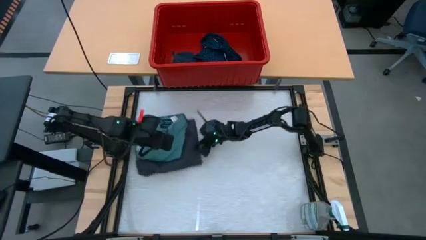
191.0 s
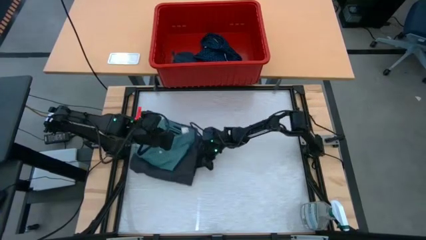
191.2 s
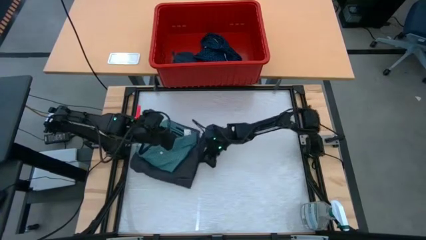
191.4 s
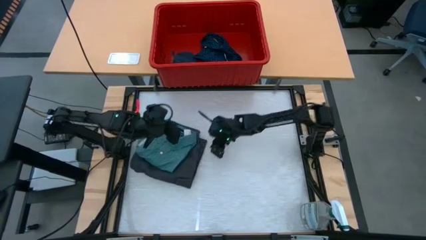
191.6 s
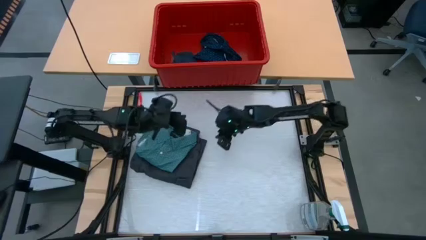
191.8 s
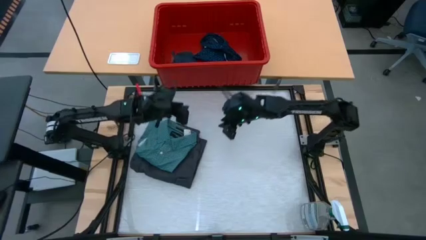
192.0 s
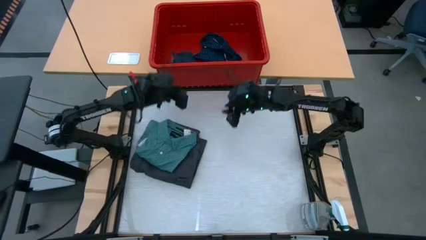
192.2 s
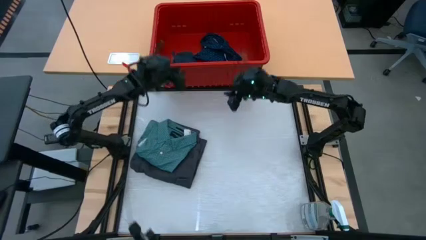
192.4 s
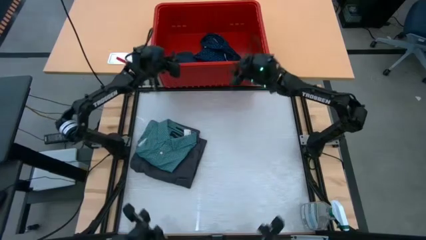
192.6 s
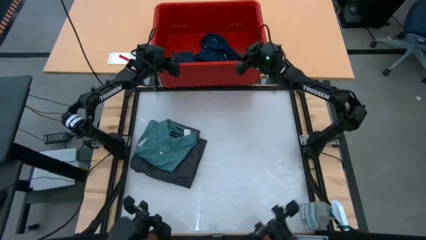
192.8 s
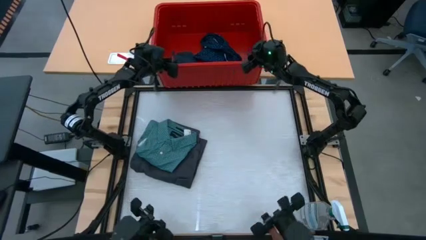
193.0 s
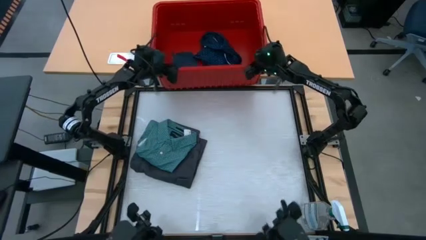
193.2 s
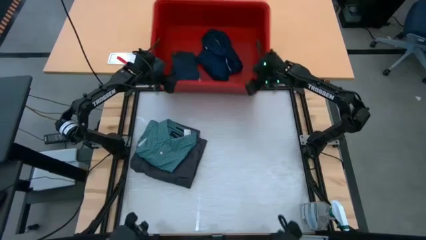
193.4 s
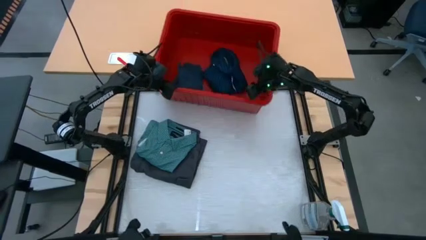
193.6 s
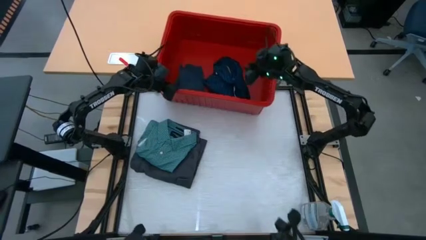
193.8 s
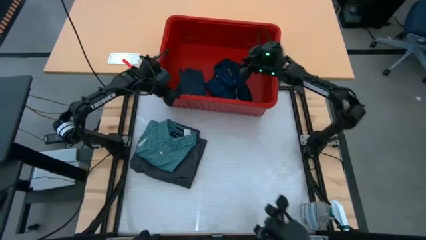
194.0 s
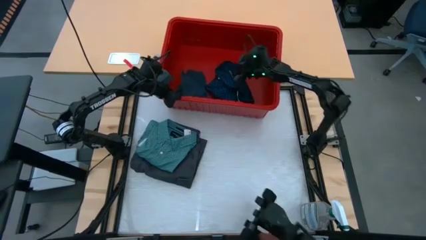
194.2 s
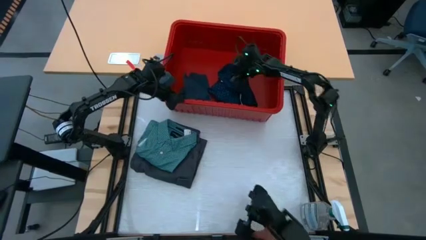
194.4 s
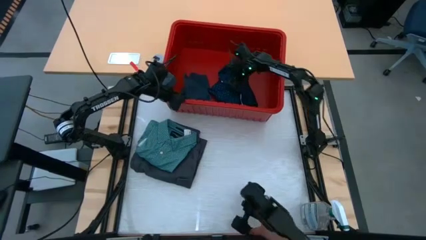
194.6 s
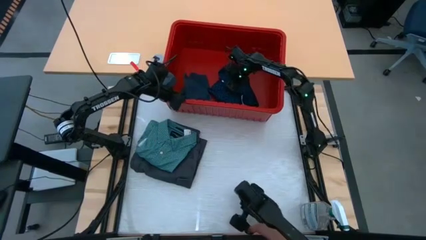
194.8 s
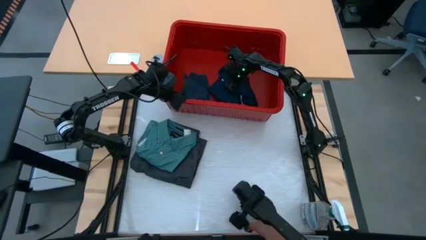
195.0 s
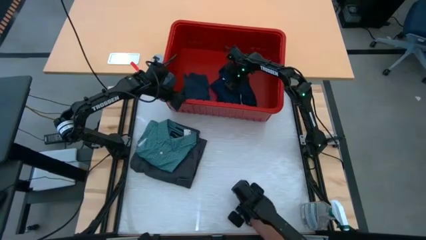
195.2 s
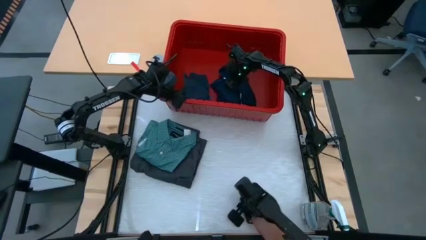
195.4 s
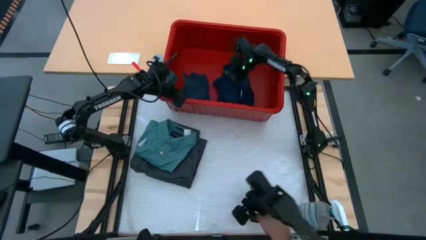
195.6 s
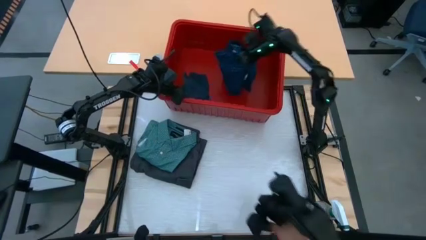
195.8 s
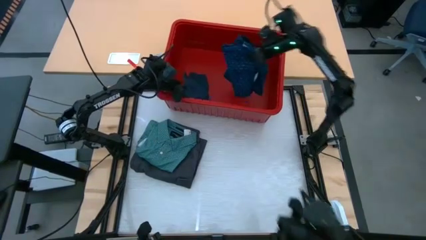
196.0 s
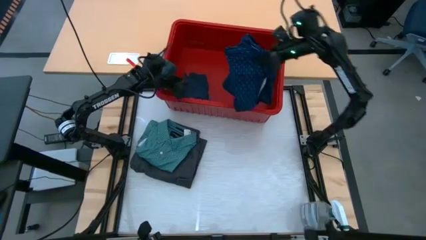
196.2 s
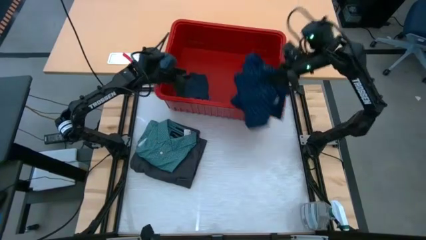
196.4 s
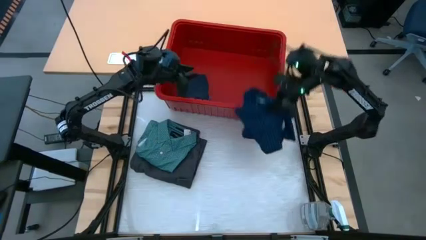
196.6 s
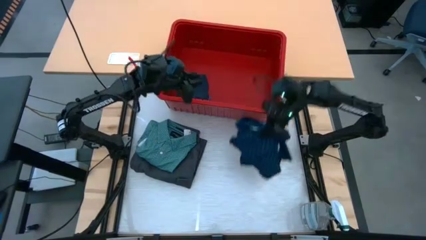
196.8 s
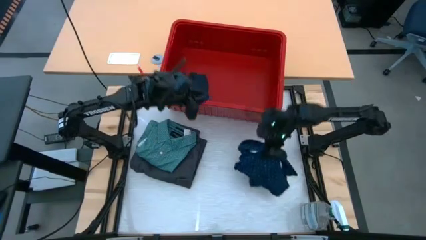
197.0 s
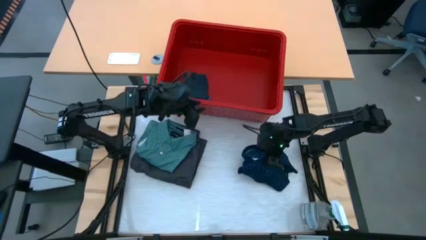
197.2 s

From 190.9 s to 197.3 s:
Task: Fold laundry
Remove the dark blue polo from the red bin

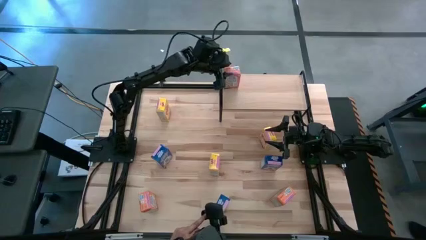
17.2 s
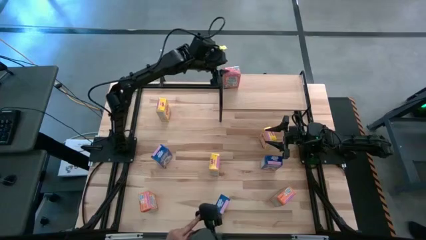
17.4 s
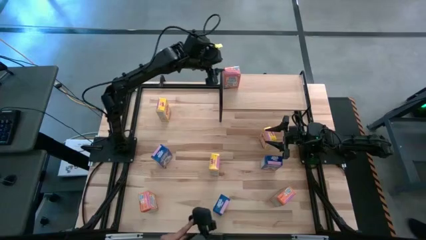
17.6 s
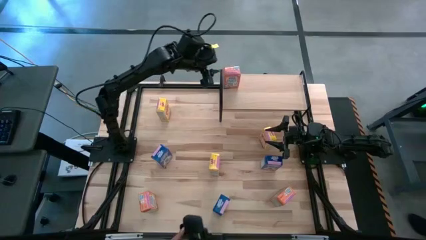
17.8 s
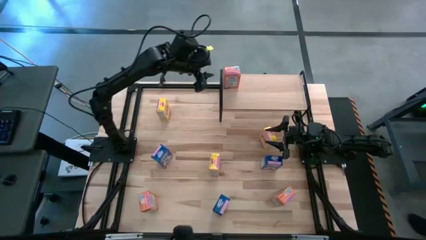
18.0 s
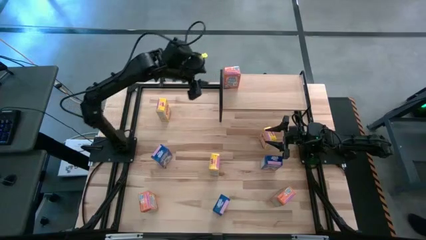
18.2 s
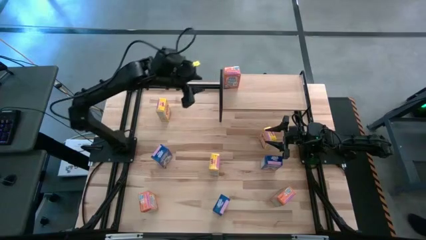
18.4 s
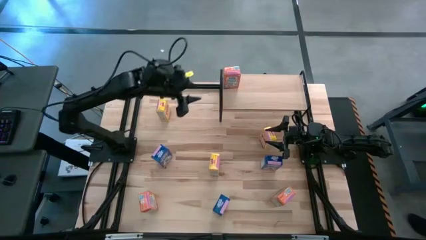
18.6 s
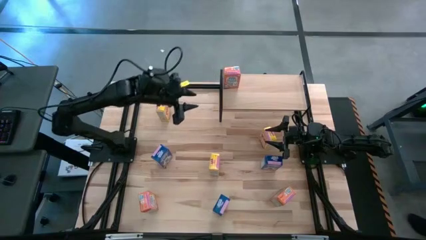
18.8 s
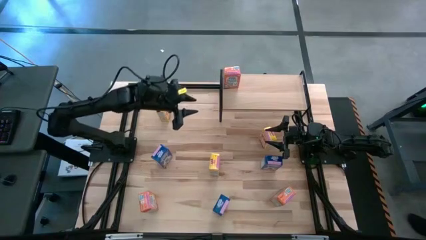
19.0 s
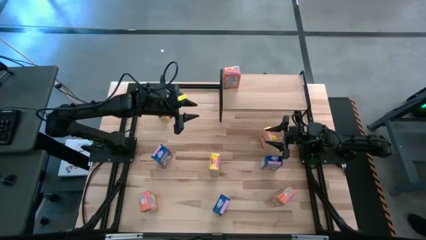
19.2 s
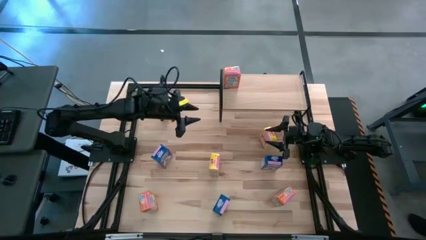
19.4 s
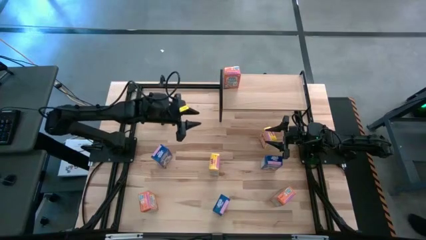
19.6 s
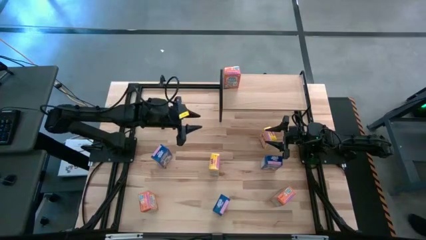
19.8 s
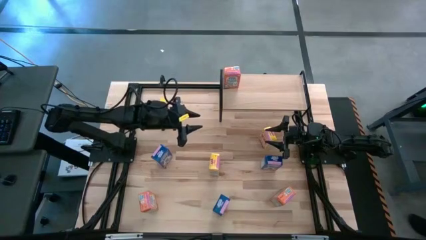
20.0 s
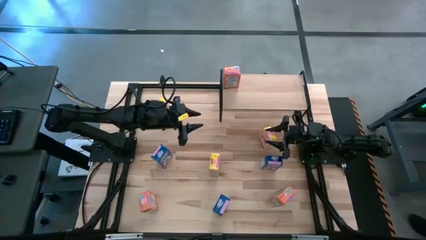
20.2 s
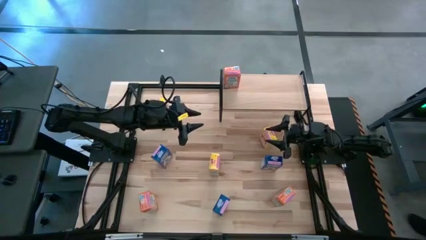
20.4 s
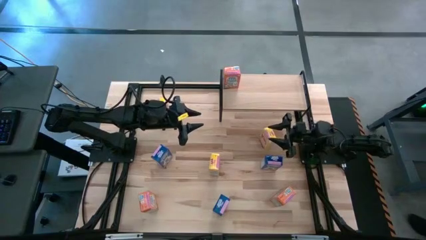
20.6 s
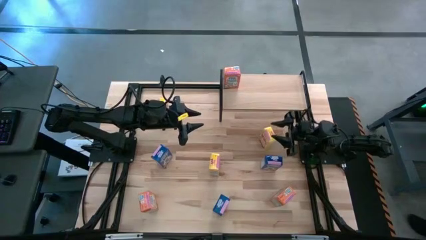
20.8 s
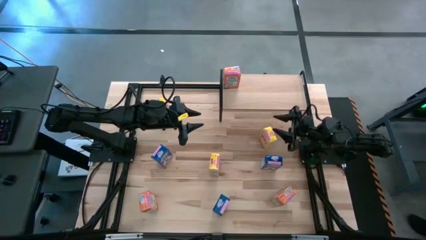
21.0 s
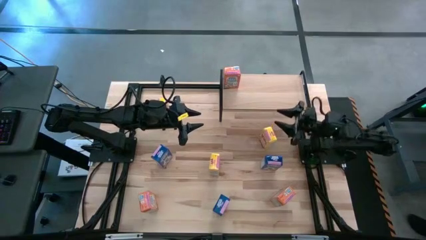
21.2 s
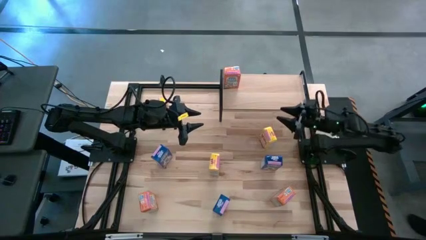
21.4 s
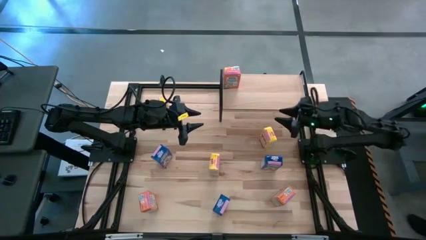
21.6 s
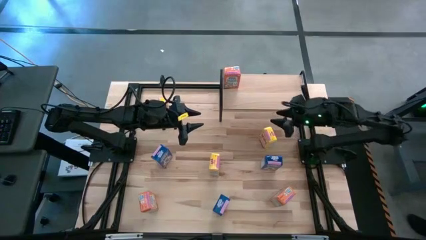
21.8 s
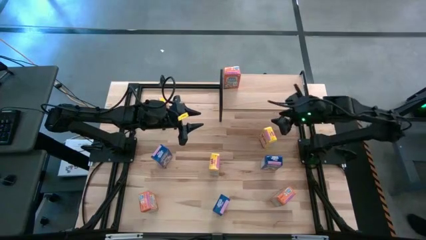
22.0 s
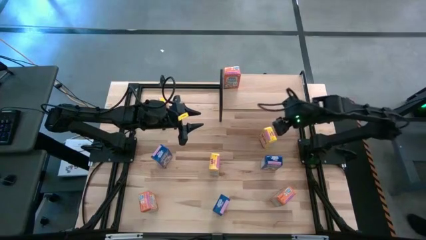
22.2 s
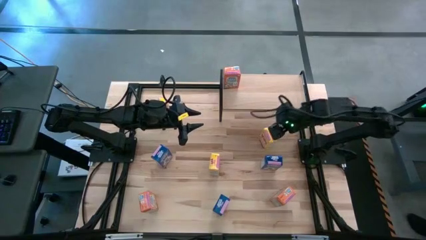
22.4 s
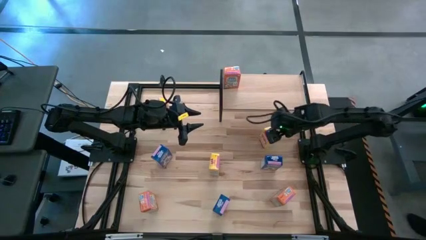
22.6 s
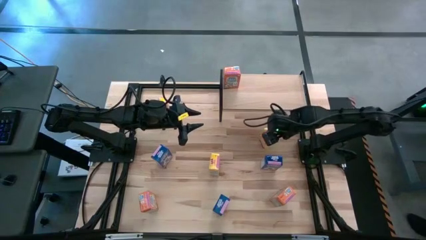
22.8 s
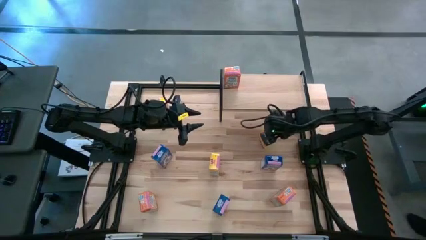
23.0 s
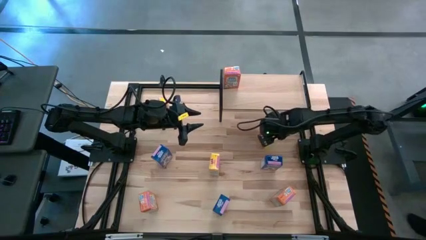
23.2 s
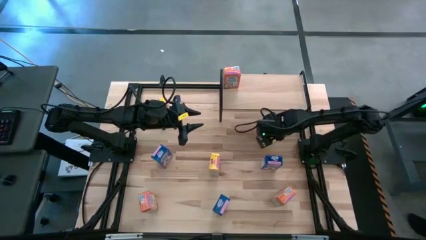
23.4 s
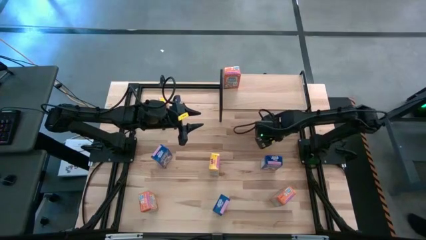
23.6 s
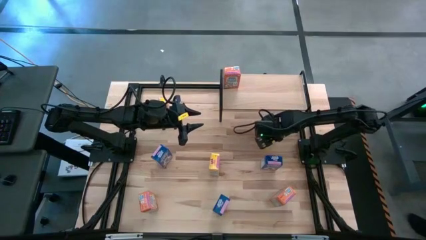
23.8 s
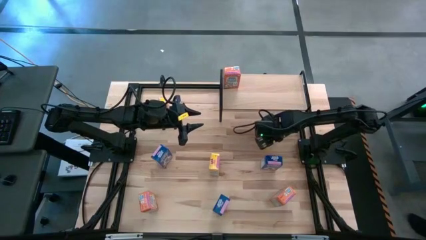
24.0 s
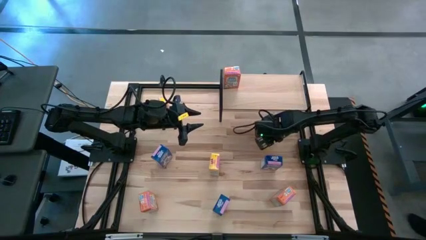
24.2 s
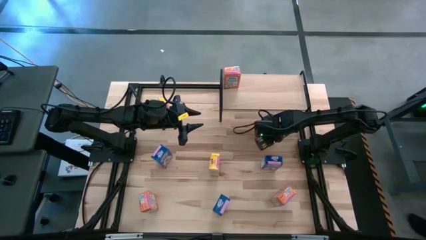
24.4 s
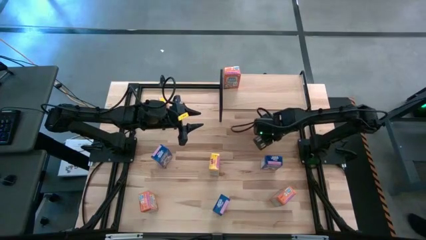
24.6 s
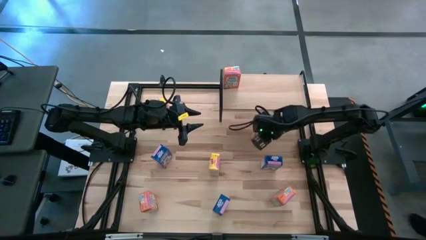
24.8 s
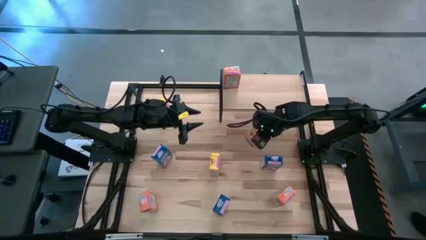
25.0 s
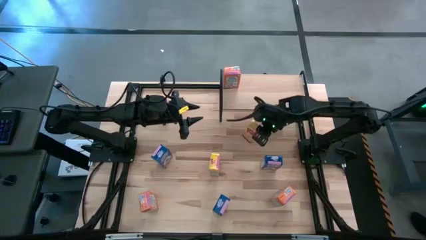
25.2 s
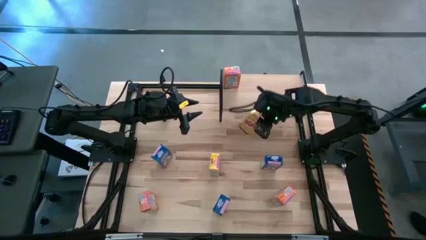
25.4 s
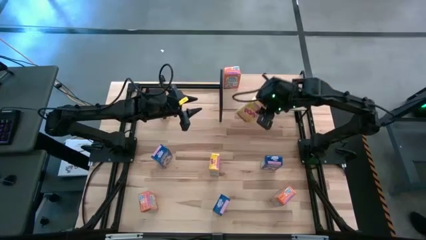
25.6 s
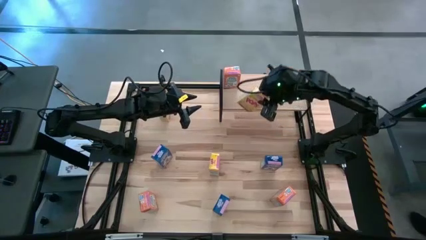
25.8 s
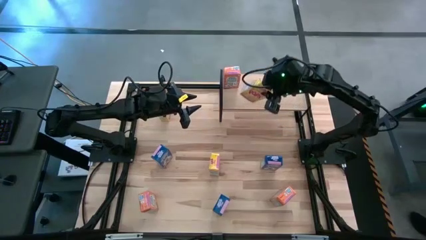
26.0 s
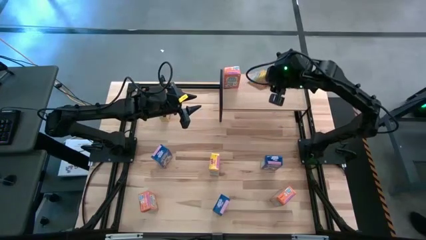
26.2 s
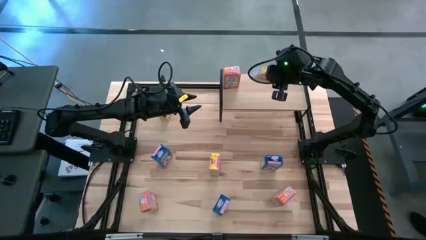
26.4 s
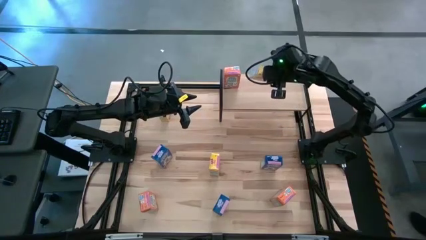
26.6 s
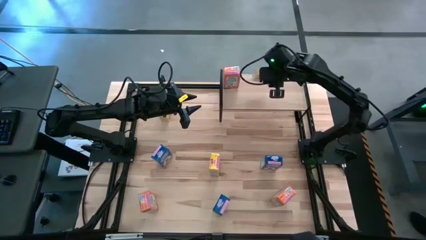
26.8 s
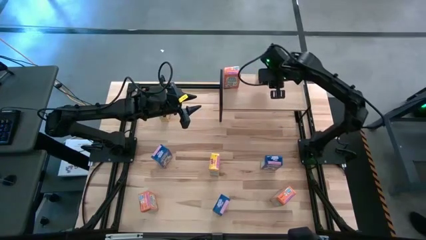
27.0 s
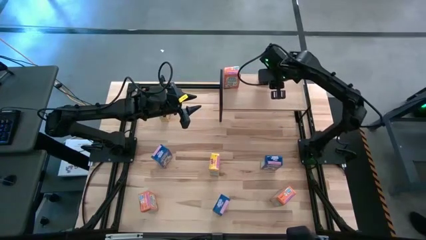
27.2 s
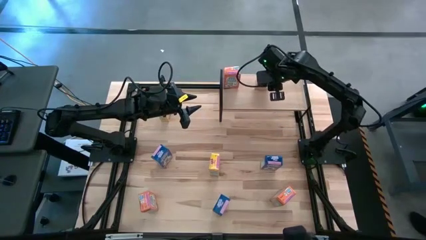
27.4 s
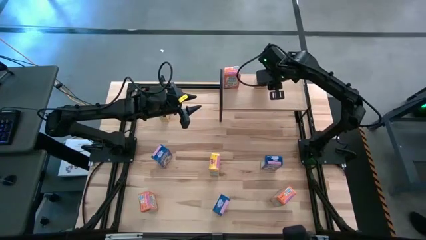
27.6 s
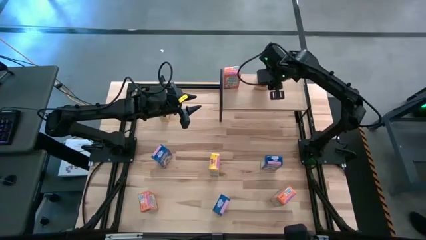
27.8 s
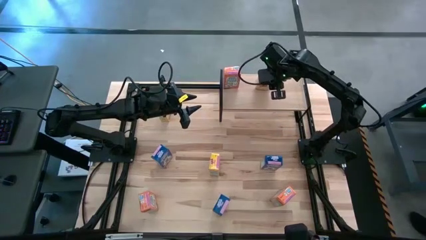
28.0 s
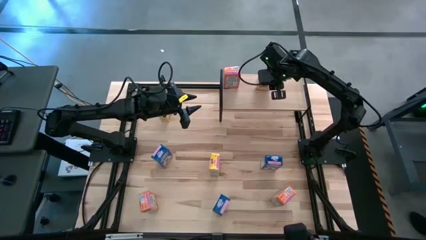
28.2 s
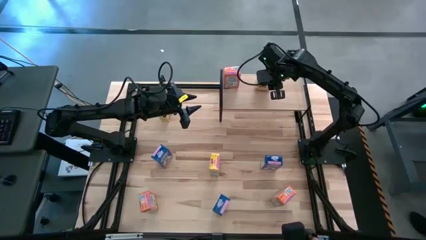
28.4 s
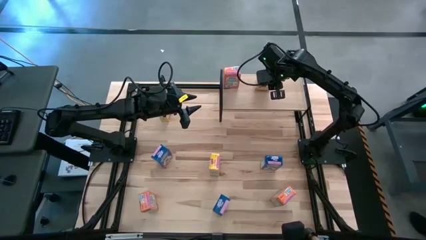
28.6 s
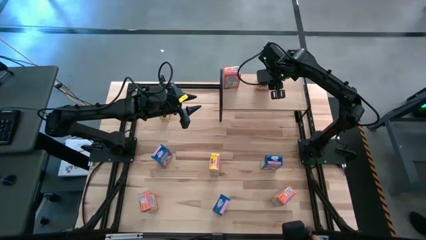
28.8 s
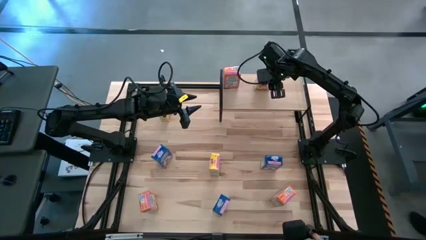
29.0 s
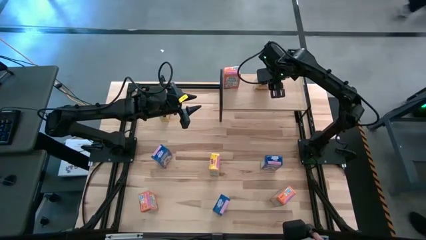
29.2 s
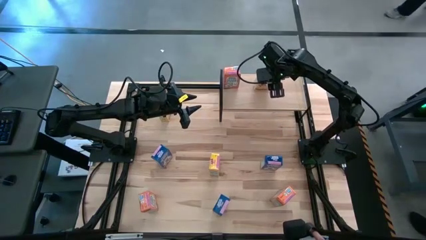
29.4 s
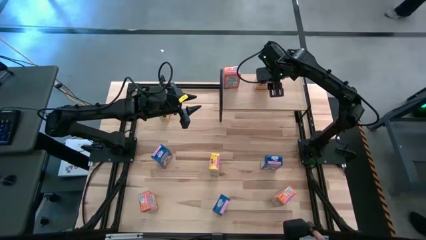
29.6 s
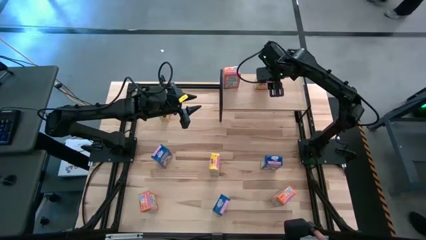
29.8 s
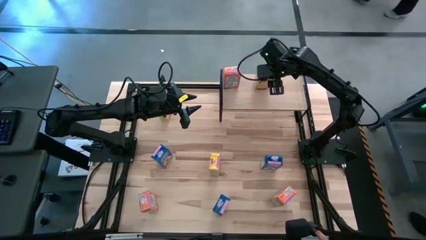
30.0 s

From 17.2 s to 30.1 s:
Task: Stack cereal on shelf
Put the middle yellow cereal box on the shelf
